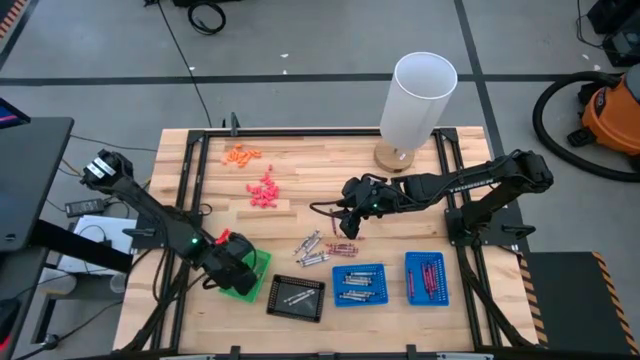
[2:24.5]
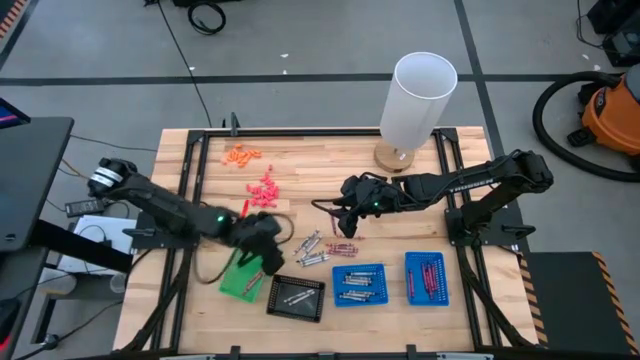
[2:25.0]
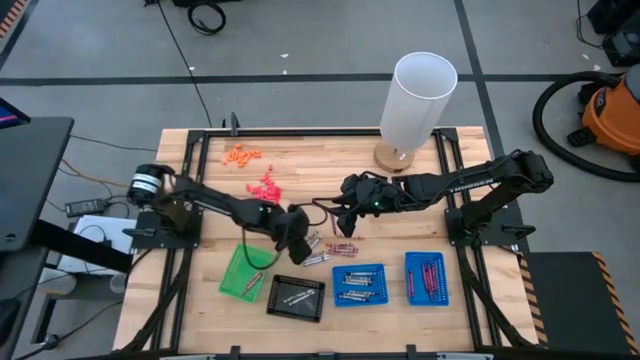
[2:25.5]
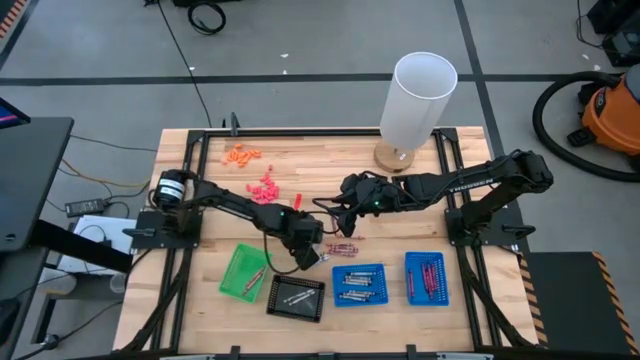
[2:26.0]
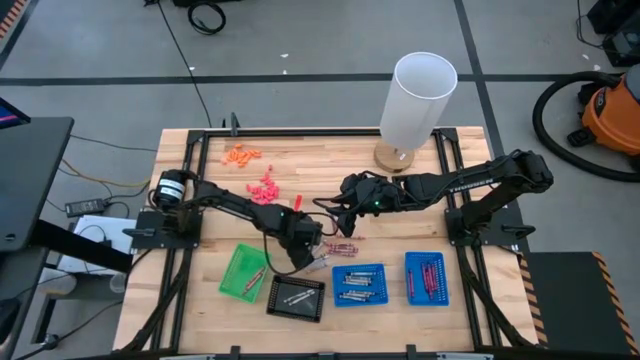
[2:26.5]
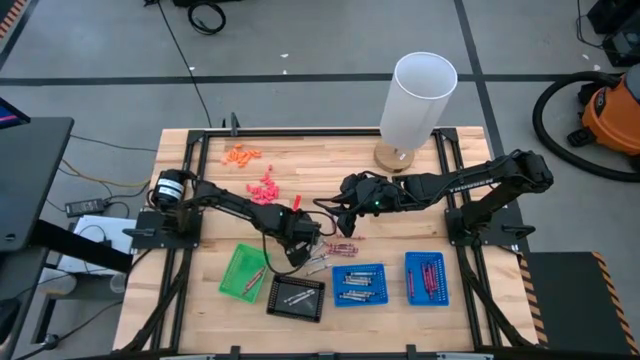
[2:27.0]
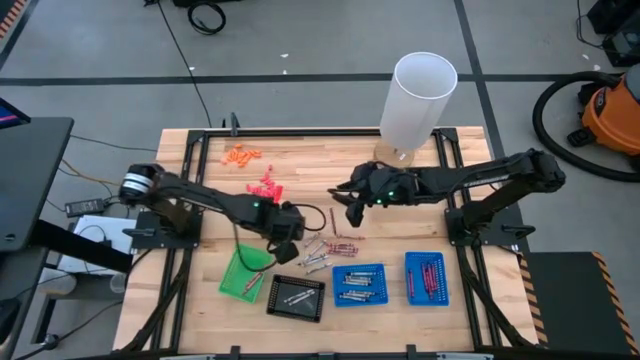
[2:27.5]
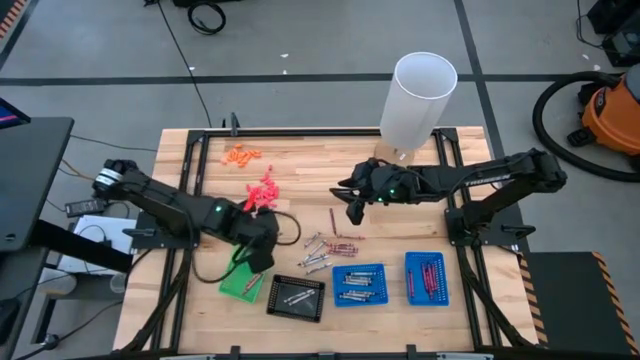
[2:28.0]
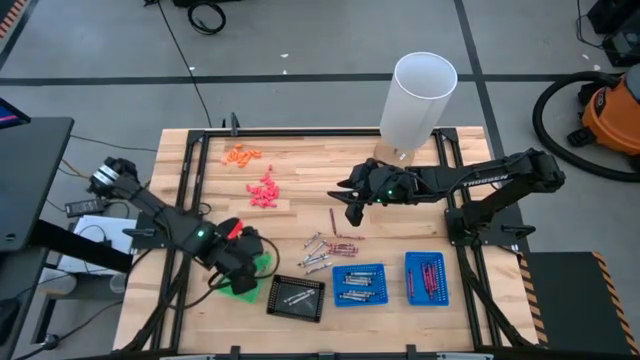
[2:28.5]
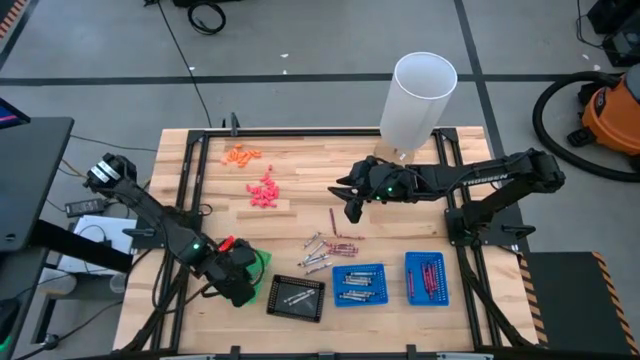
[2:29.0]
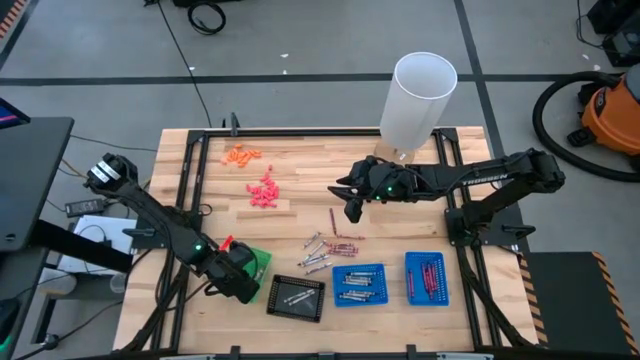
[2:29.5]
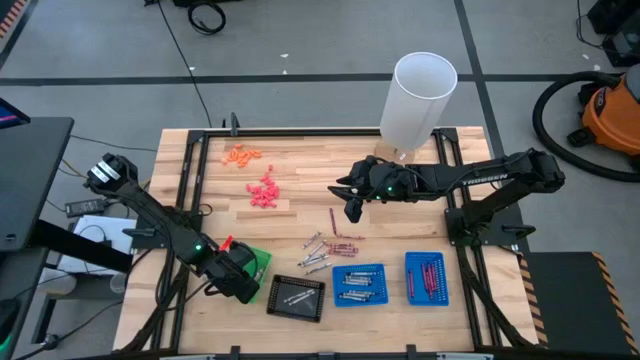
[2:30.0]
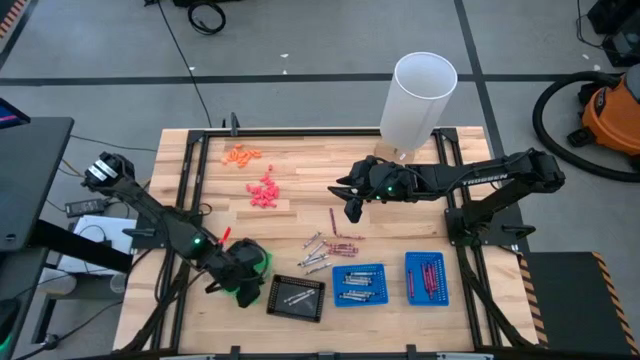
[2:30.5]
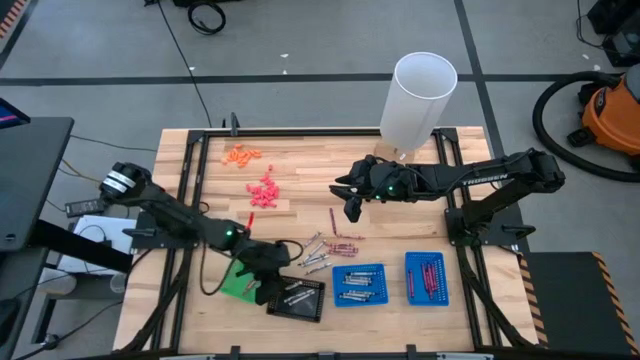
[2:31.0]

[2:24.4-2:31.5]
Task: Sort crayons
Put the white crayon into the black basket

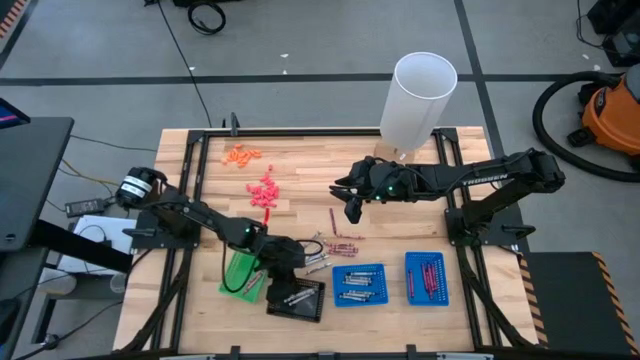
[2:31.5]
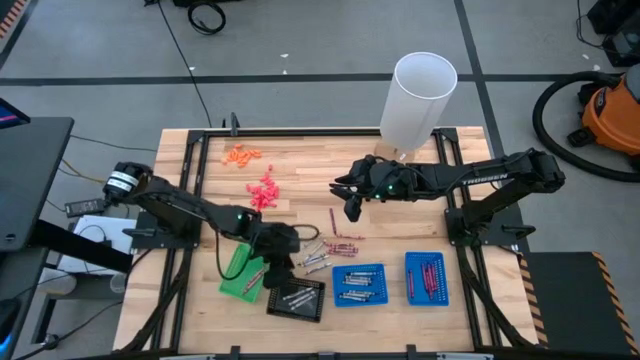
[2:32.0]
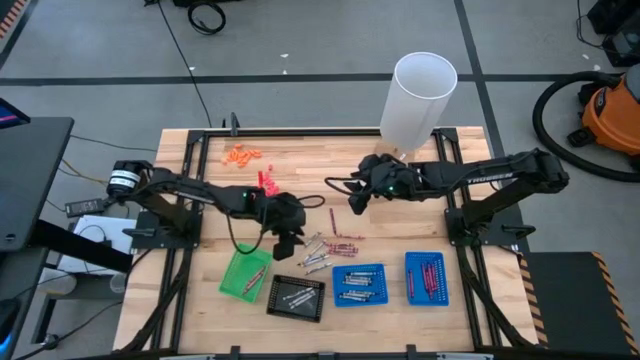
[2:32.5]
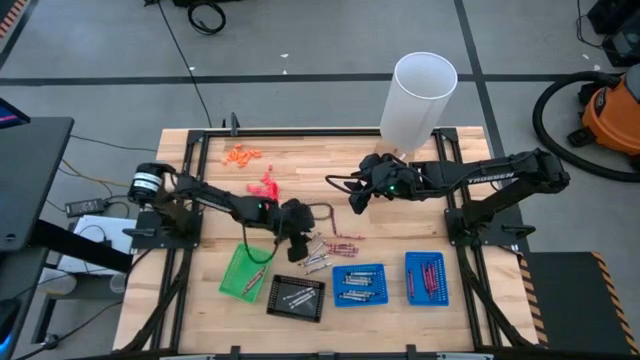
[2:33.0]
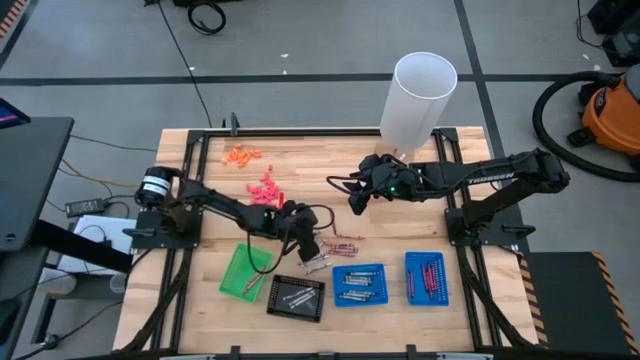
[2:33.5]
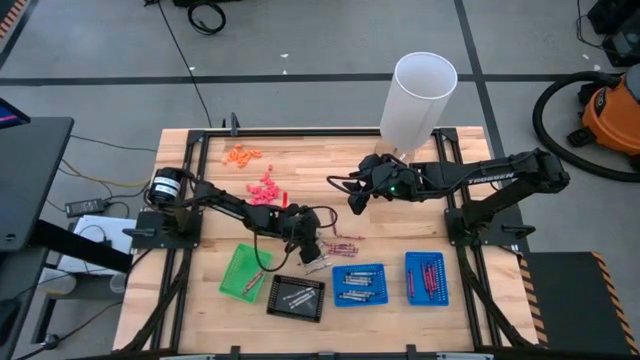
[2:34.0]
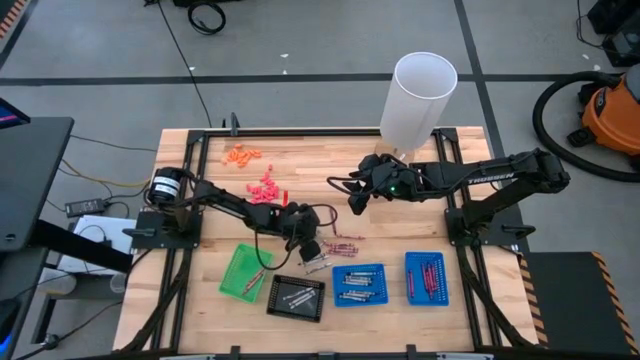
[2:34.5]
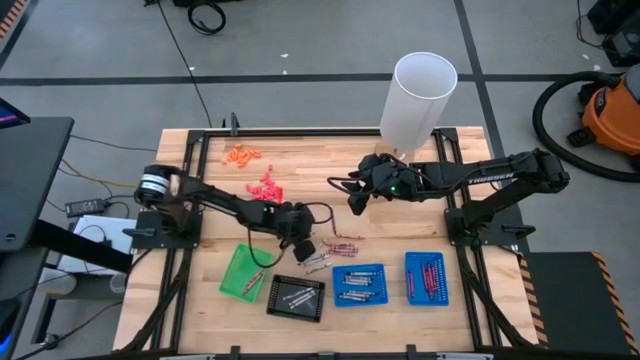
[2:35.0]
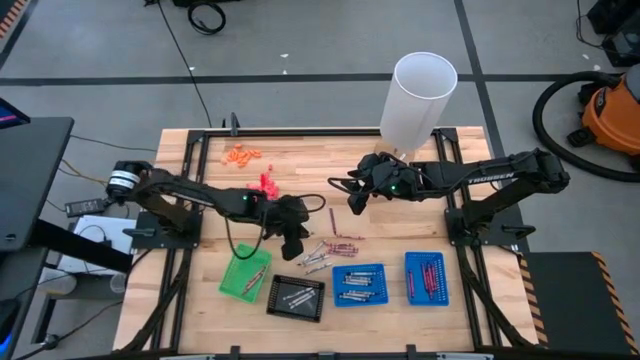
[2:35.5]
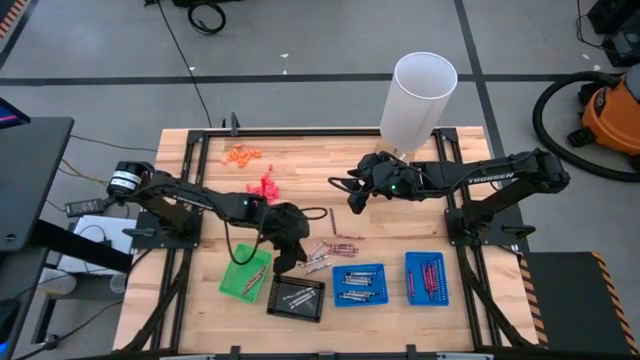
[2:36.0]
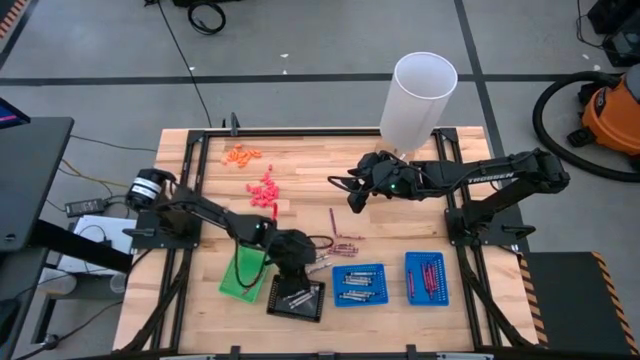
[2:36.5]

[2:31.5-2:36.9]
Put the white crayon into the black basket

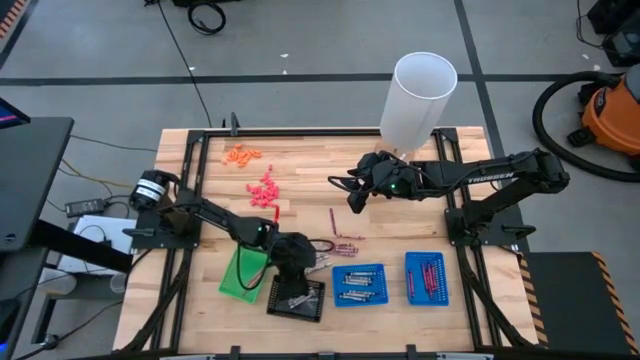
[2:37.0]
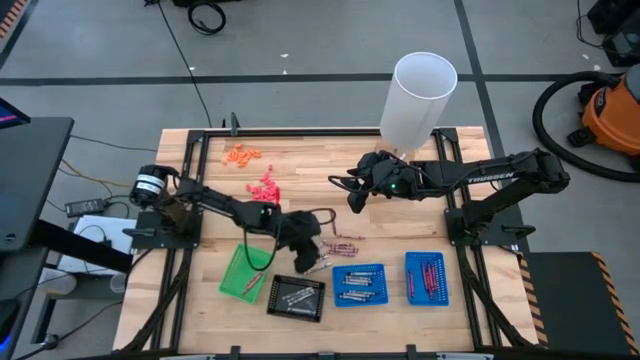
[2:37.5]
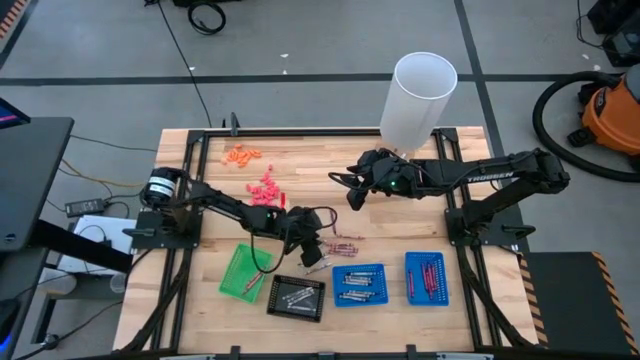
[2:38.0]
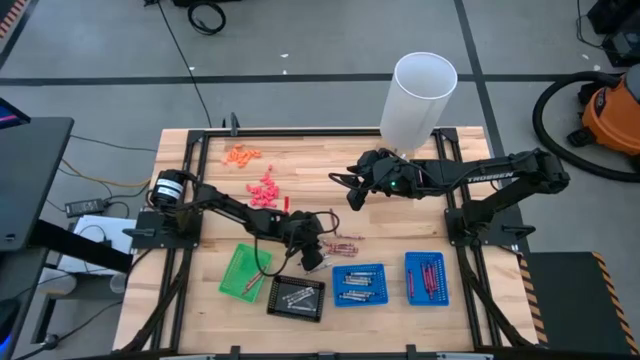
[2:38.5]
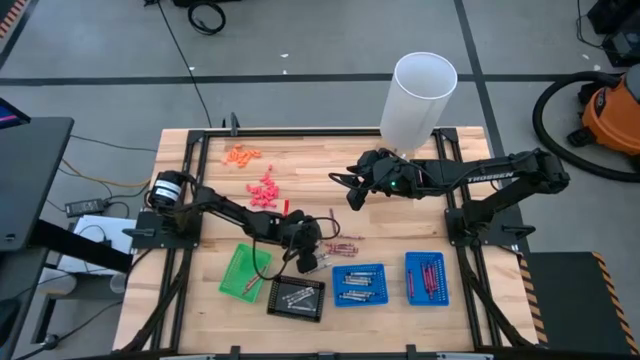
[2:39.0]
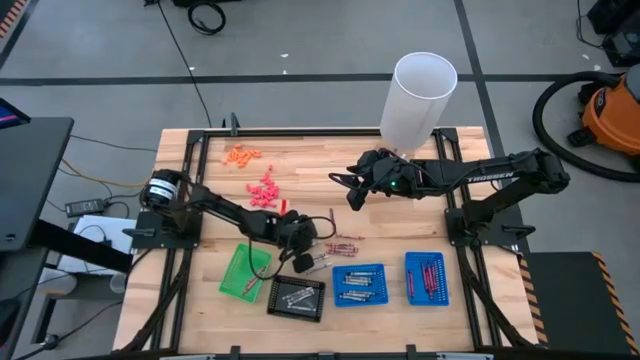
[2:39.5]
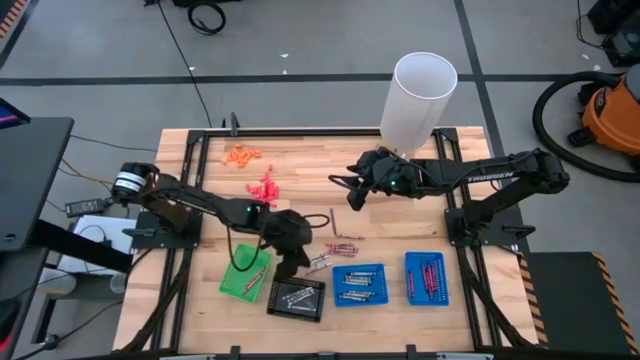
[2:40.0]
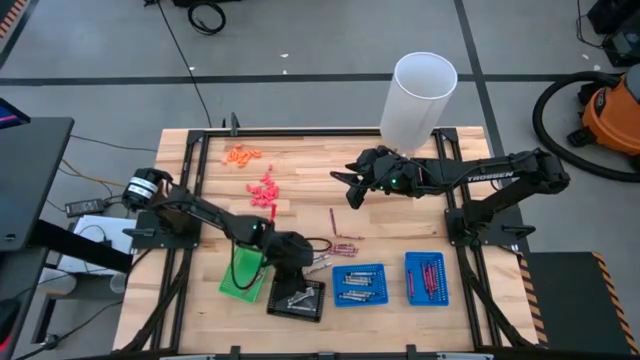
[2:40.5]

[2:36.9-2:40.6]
Put the white crayon into the black basket

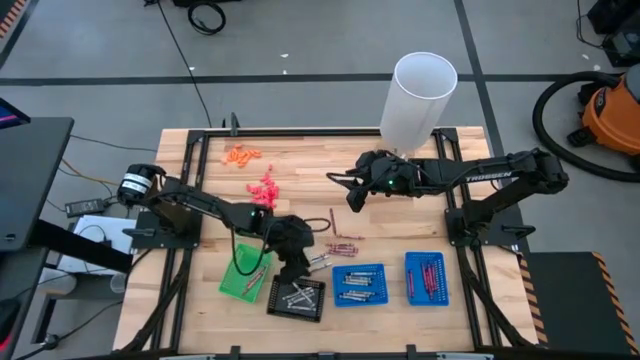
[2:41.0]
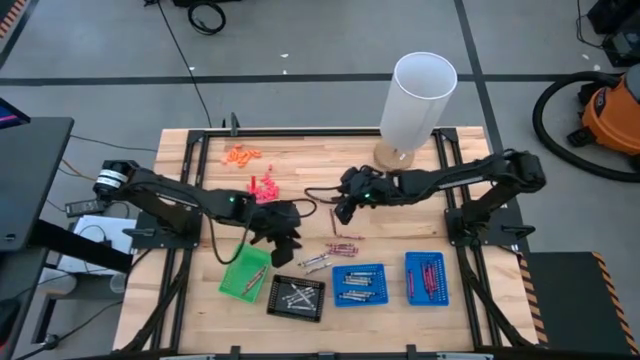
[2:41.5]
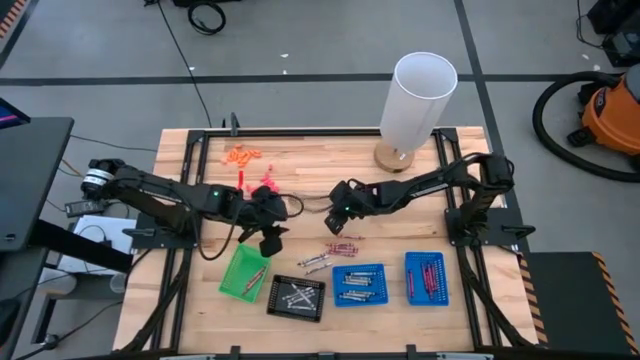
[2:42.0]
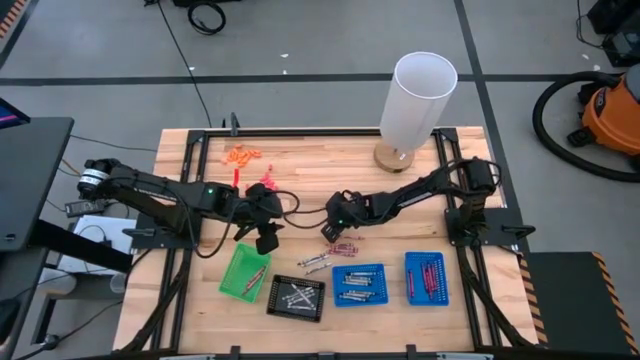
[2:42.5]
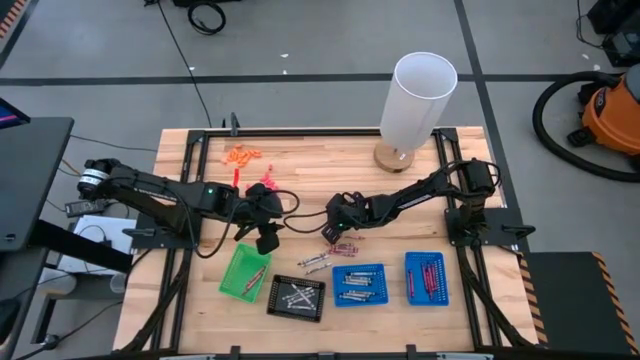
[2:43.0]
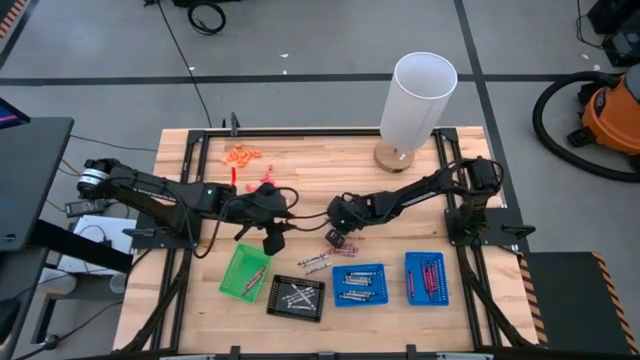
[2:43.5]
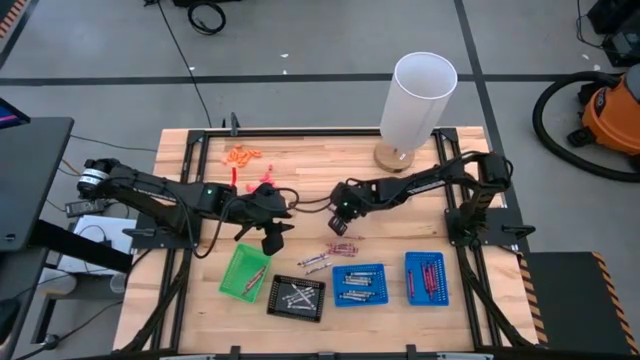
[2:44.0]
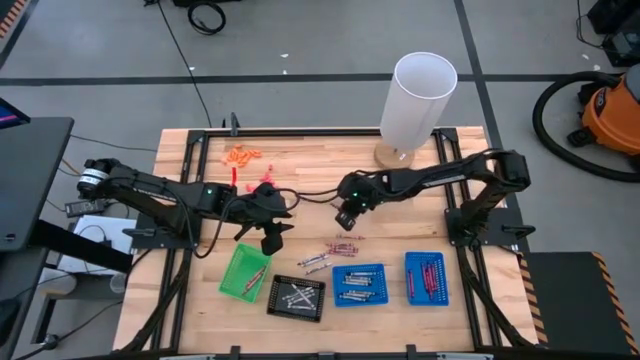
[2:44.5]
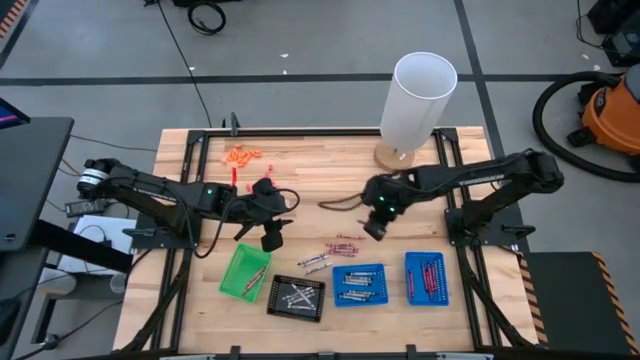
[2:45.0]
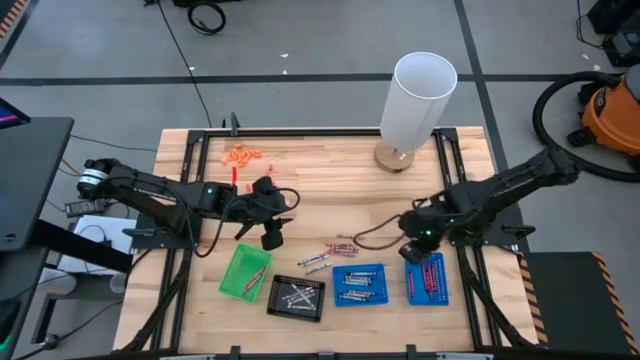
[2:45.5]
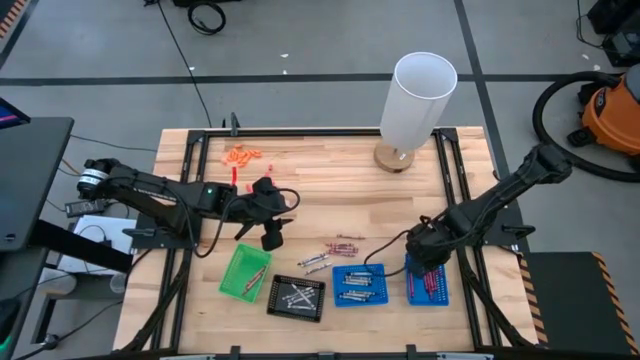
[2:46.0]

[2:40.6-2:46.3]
Put the red crayon into the right blue basket
